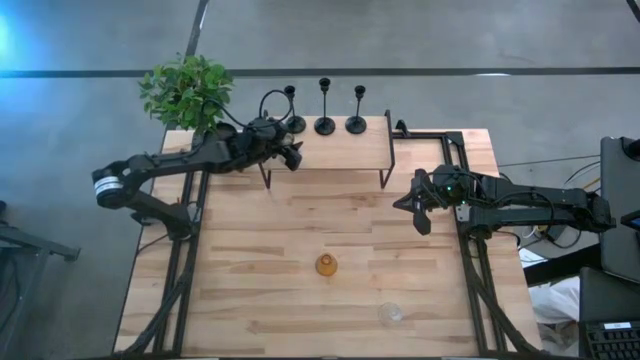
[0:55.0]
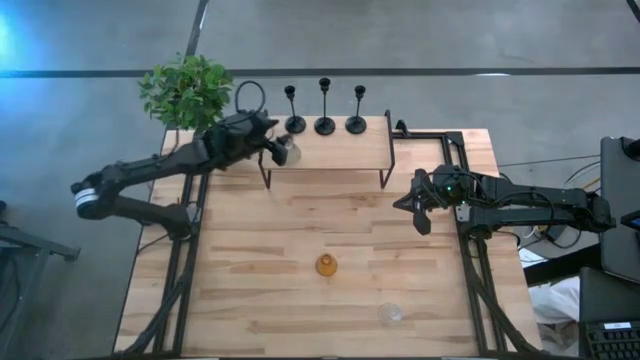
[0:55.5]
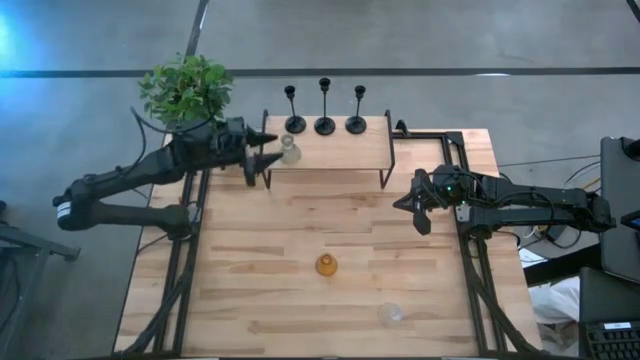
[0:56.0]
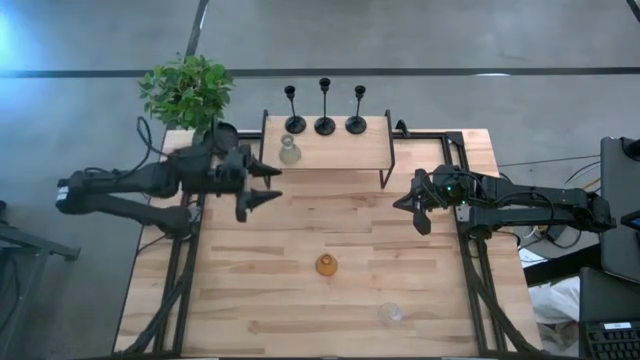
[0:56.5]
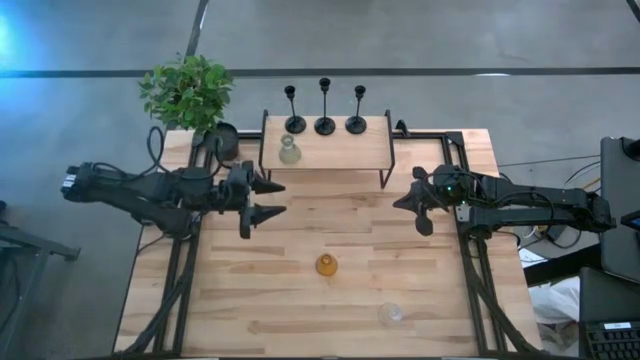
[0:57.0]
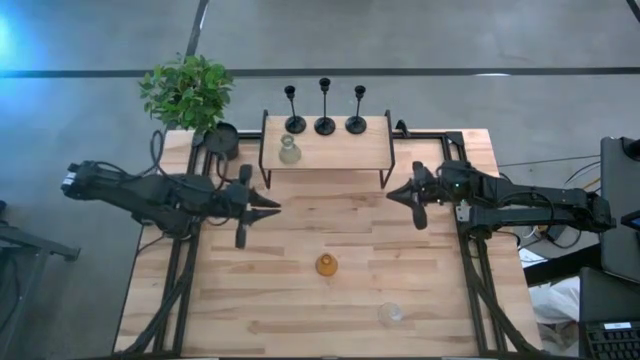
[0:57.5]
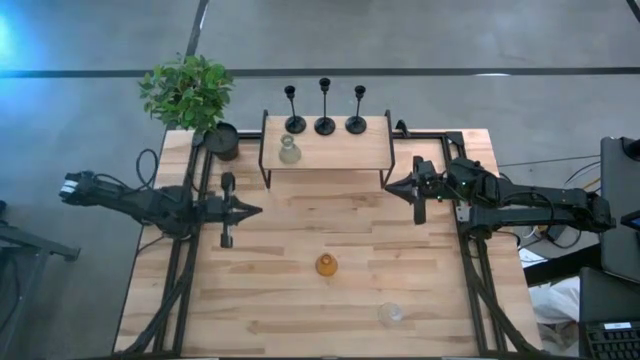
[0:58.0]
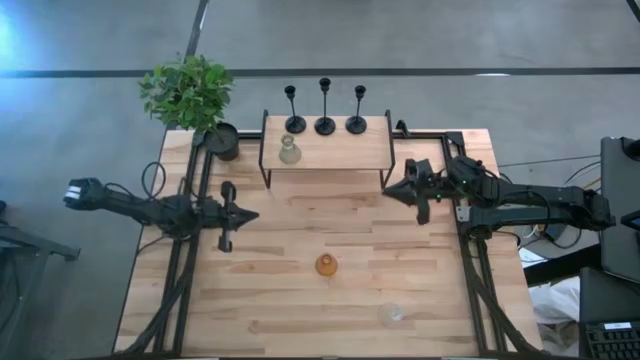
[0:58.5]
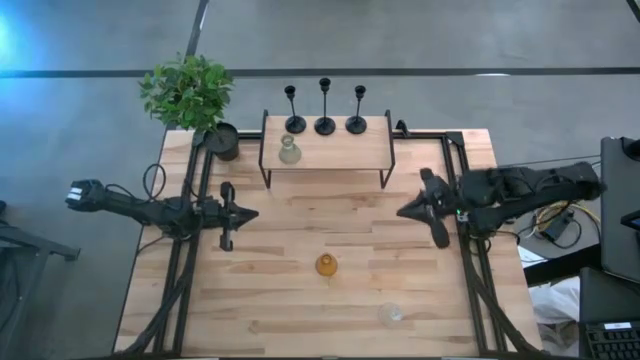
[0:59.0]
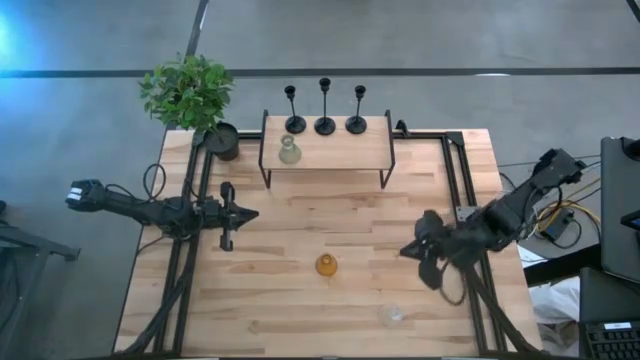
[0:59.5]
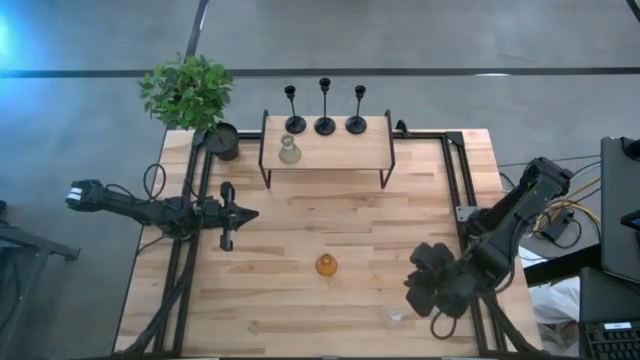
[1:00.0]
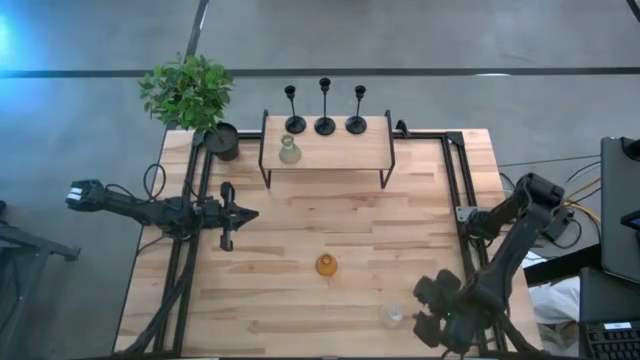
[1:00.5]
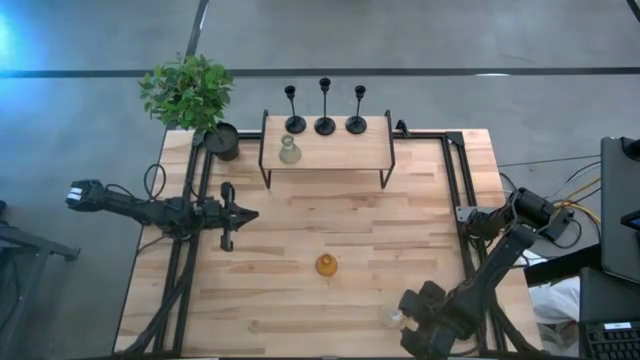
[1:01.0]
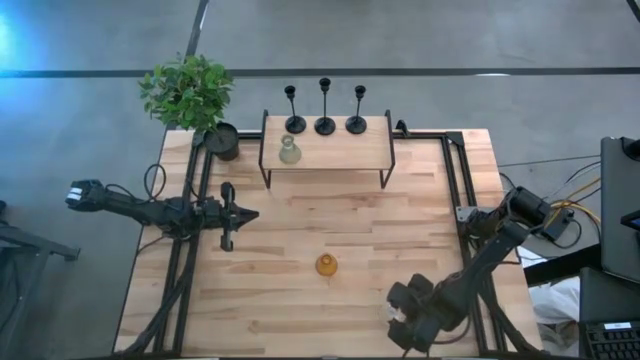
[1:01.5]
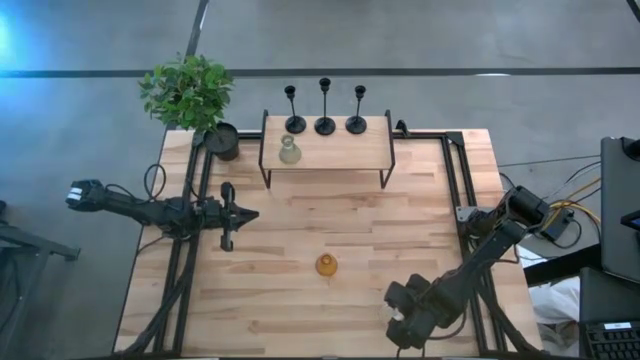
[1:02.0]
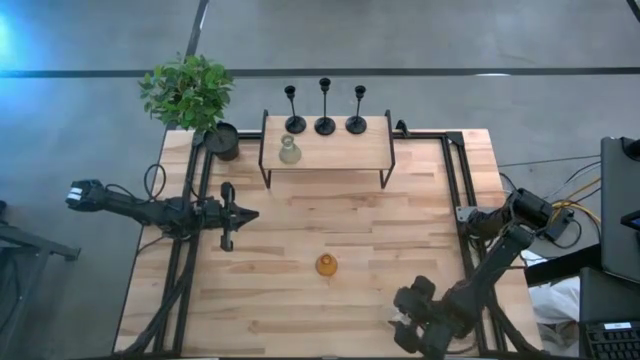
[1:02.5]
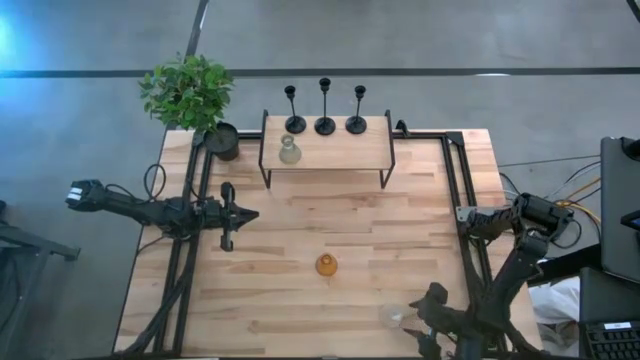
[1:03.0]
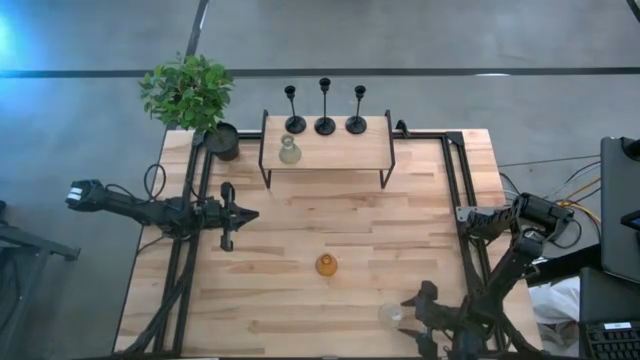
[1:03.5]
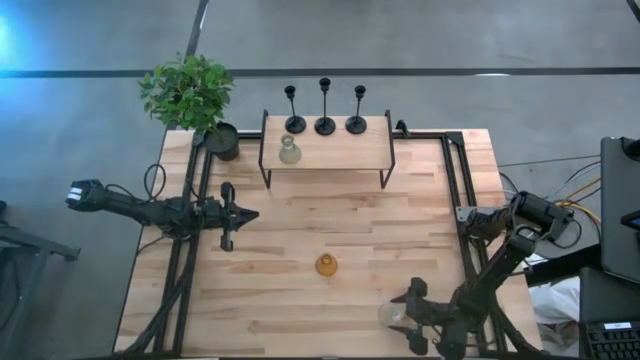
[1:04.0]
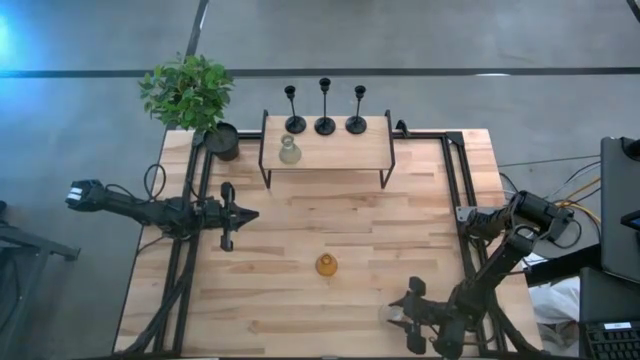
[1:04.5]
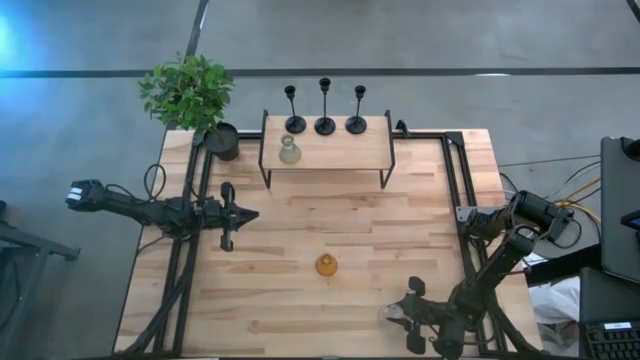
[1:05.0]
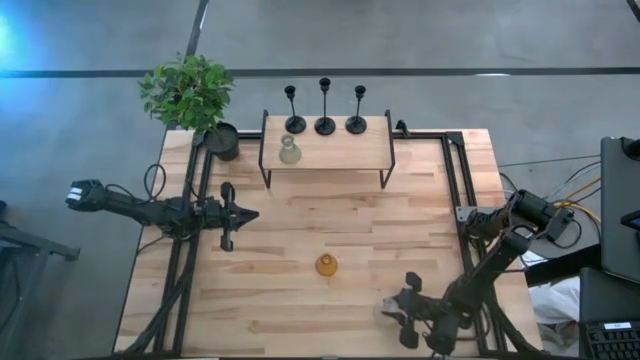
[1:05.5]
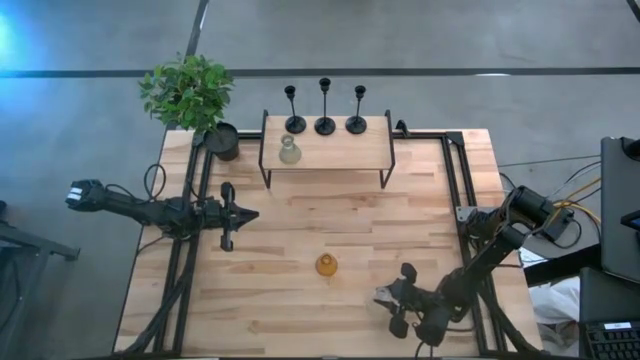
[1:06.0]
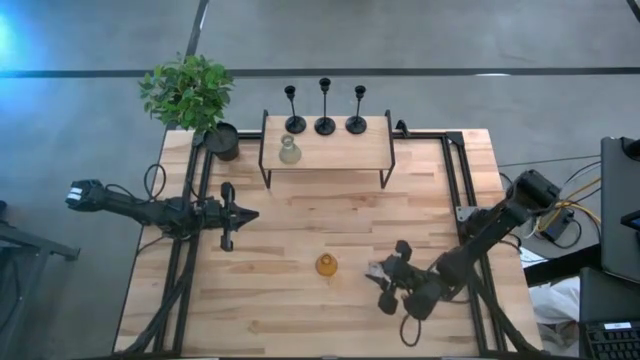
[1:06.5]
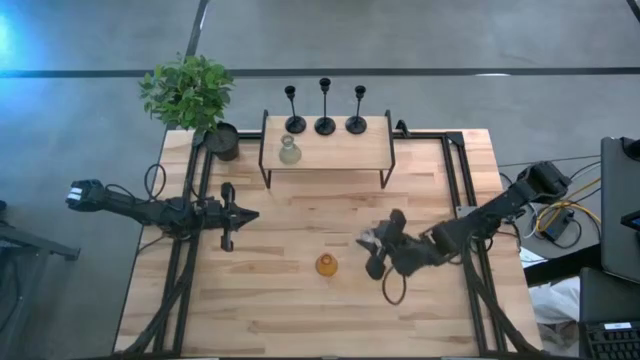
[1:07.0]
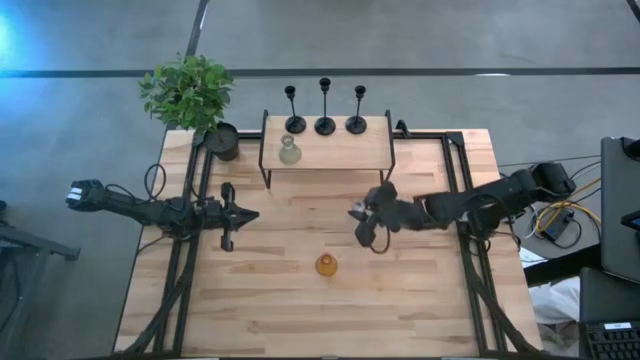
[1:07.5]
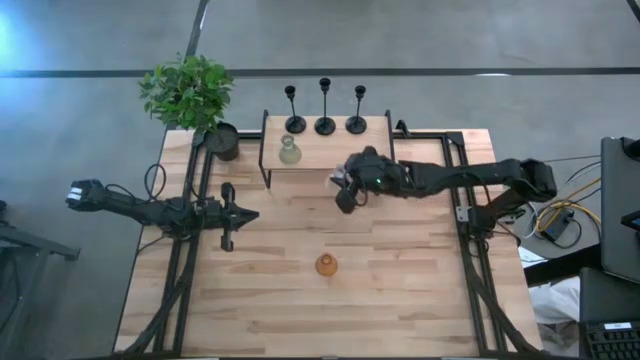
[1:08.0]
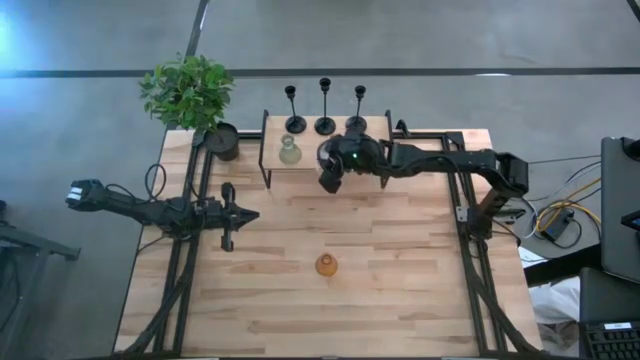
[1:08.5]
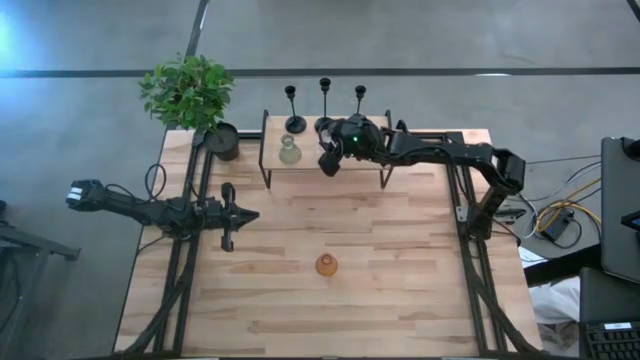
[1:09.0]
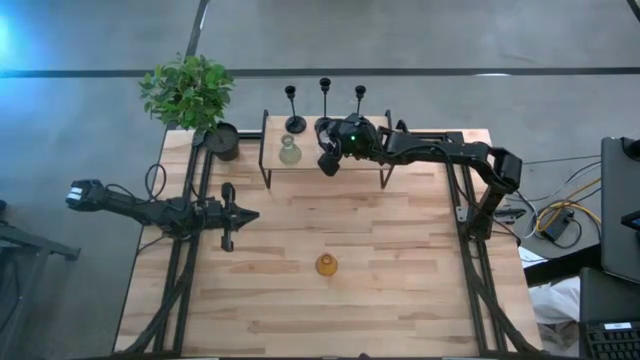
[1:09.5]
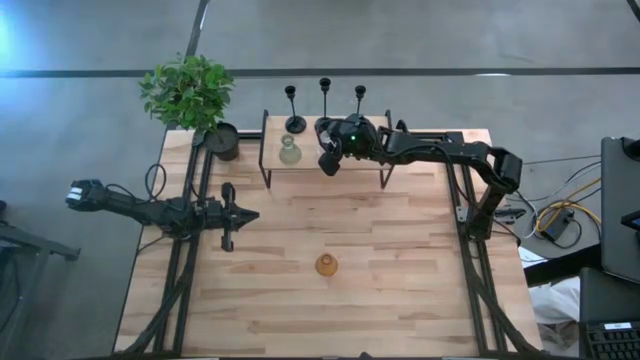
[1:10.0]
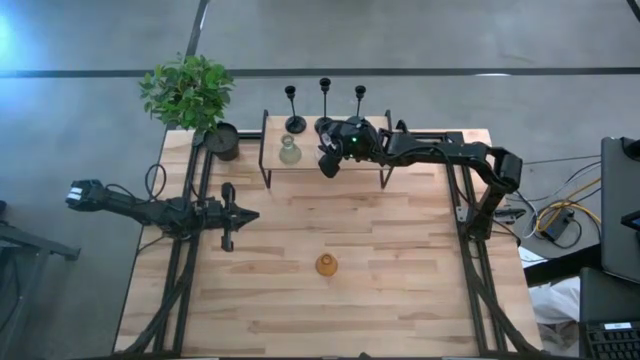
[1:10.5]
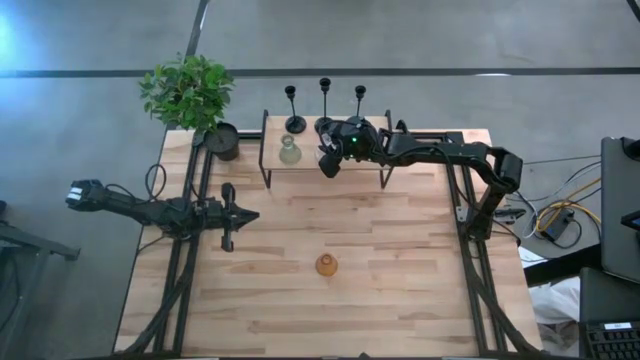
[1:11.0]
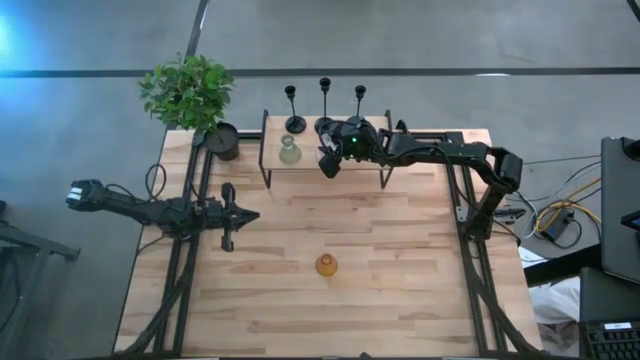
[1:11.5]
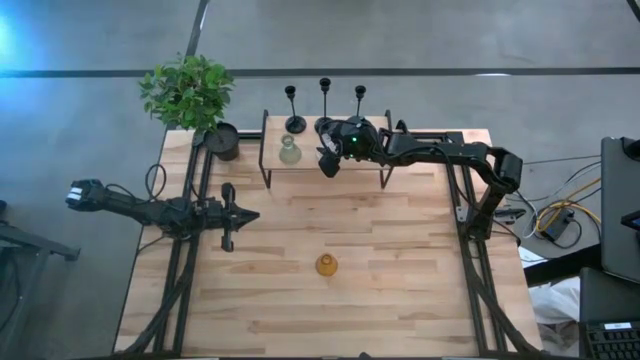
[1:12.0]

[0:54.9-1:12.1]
Task: Pick & Place candle stick holders
Put the transparent candle holder on the shelf

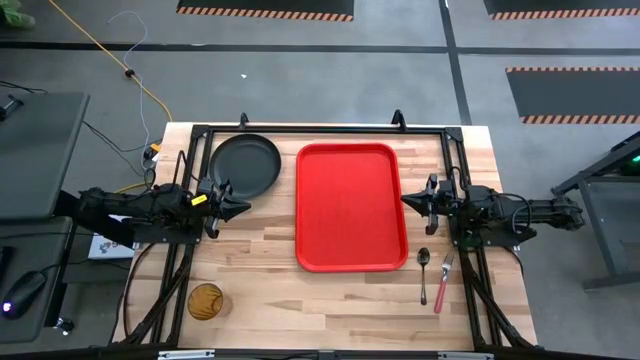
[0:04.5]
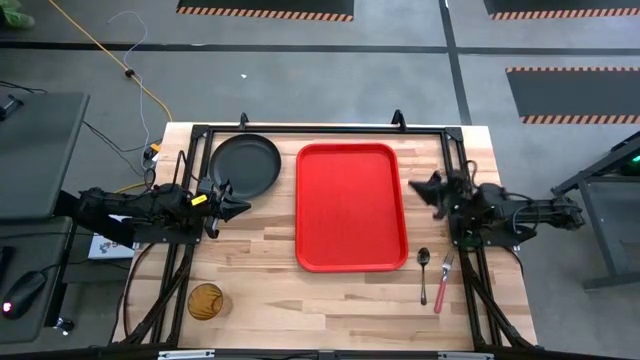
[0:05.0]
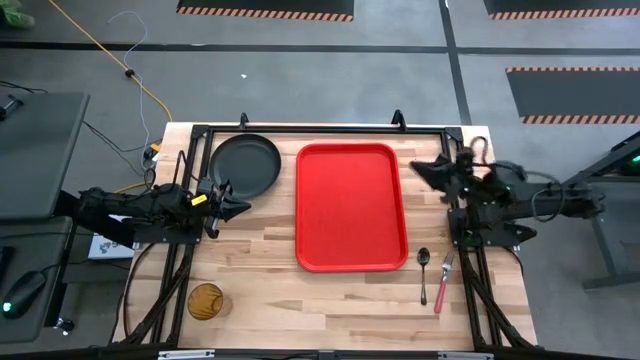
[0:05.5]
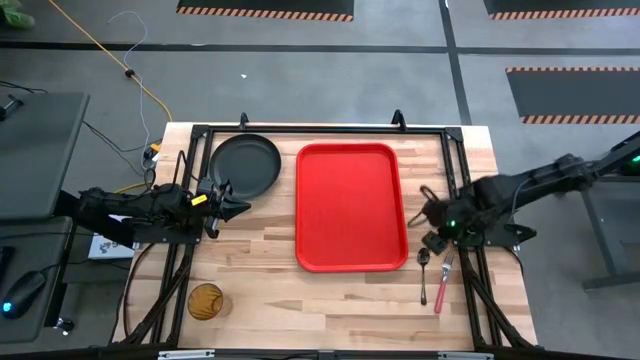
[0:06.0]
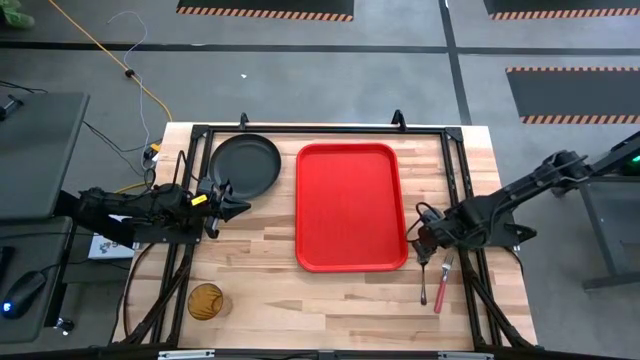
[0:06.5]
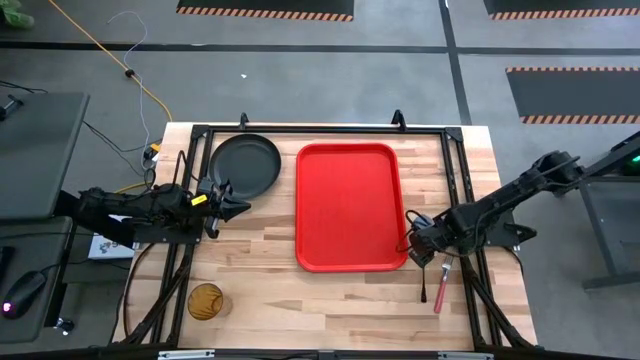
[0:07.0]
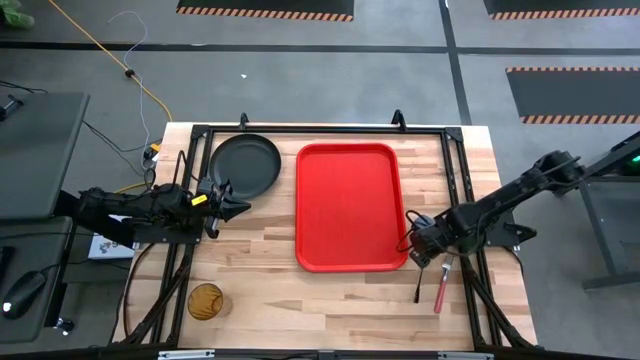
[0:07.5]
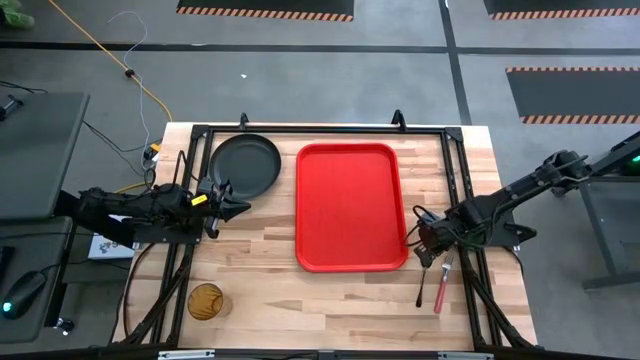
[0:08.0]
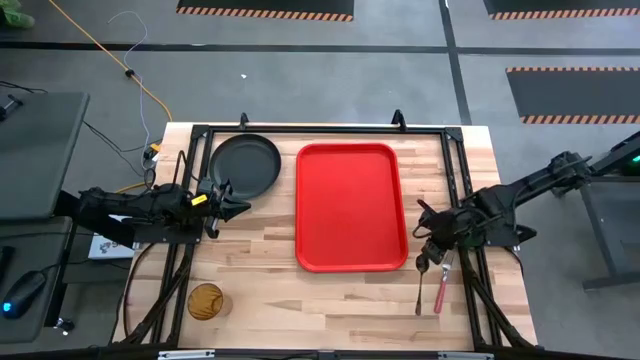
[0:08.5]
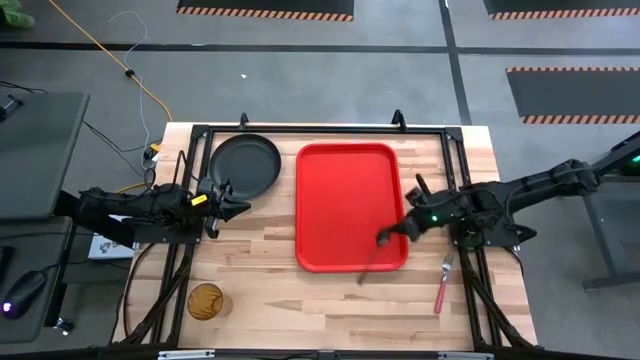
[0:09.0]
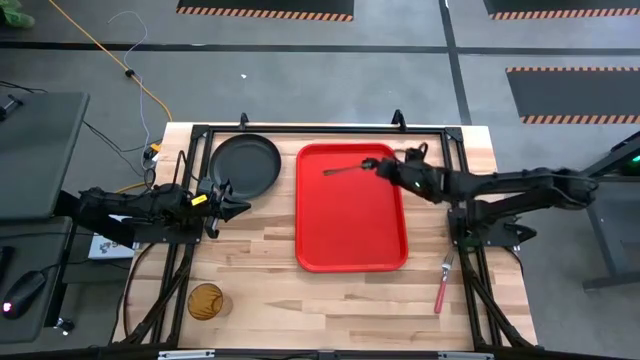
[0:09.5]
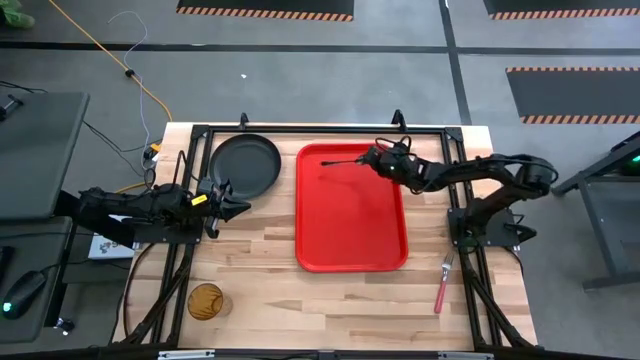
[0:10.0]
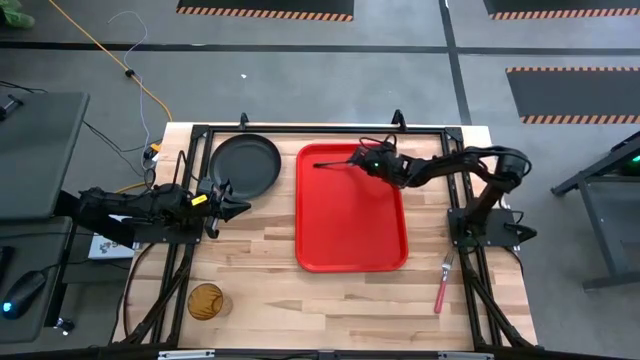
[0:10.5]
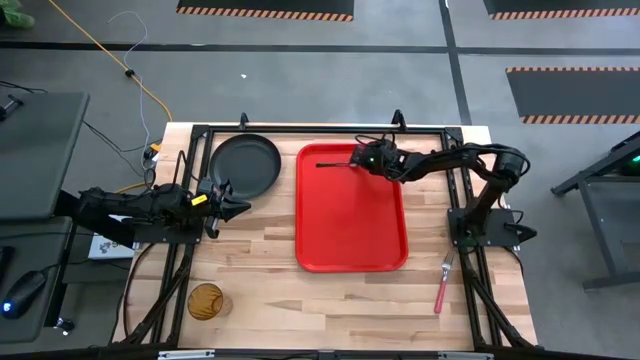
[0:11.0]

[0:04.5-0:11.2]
Task: Pick and place plate/cup/fork/spoon on tray
Put the black spoon on the red tray
